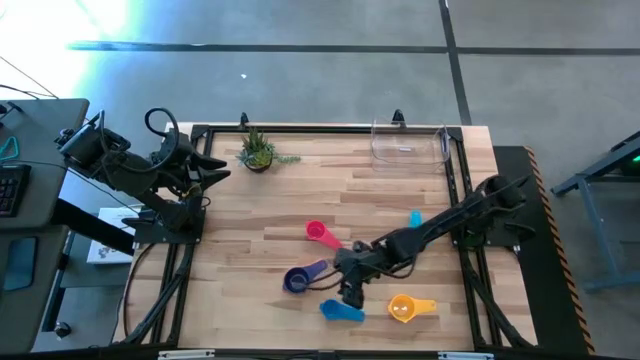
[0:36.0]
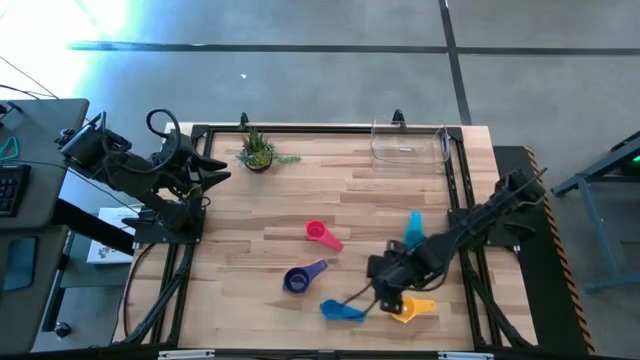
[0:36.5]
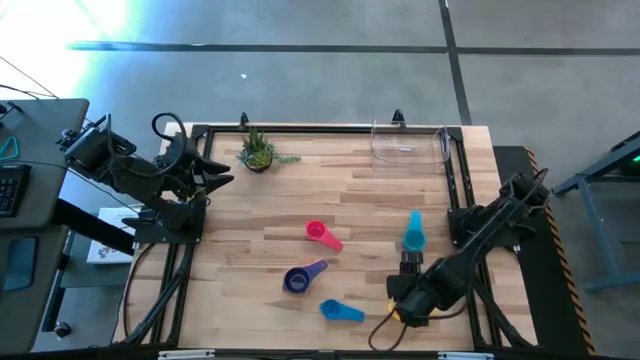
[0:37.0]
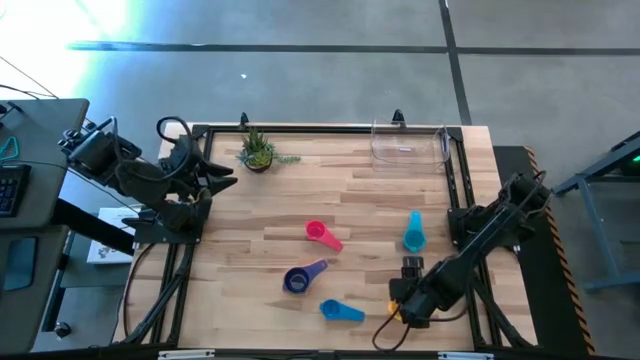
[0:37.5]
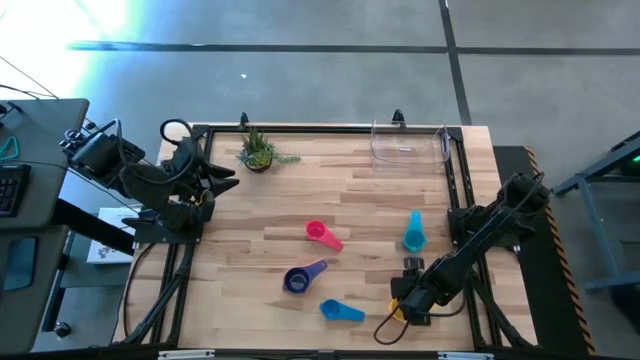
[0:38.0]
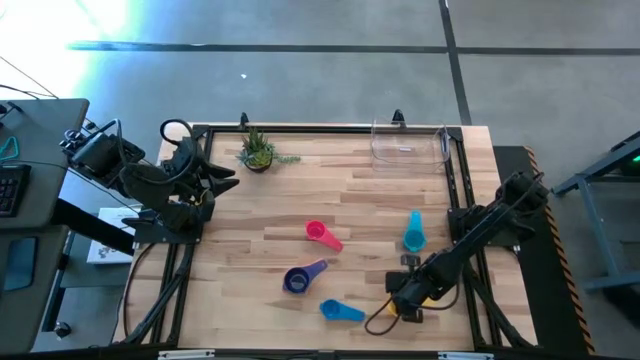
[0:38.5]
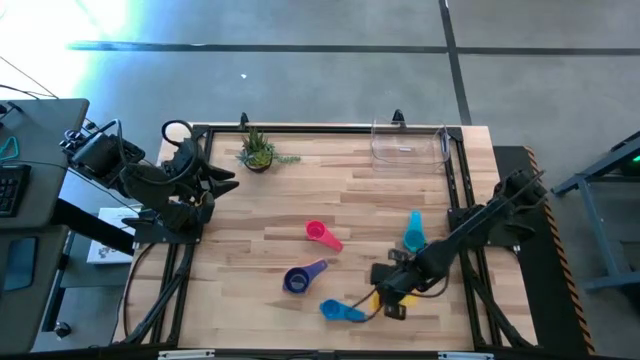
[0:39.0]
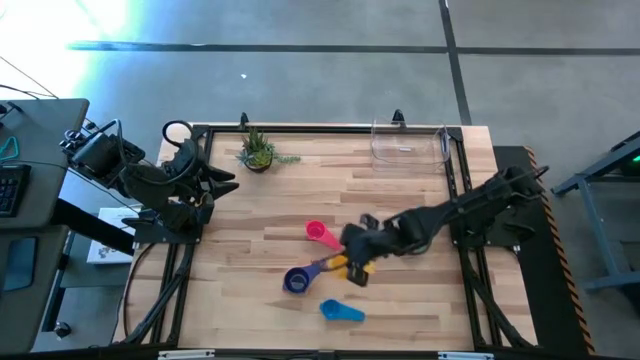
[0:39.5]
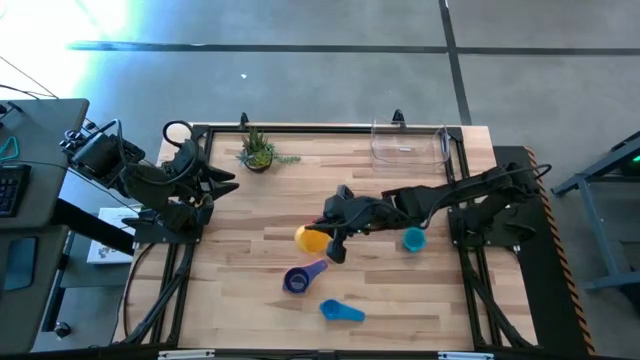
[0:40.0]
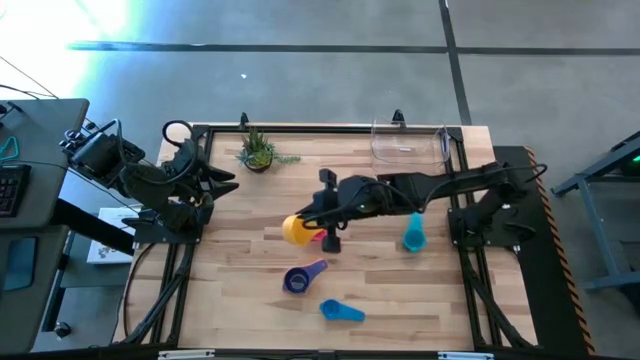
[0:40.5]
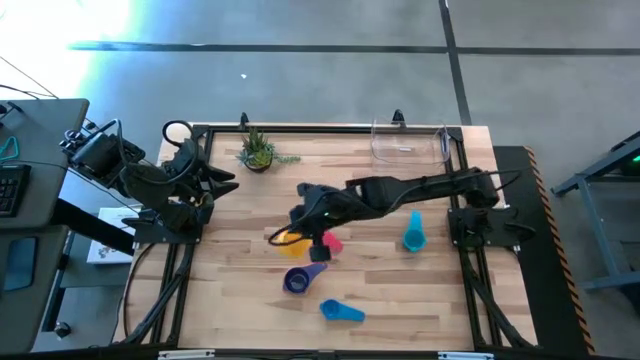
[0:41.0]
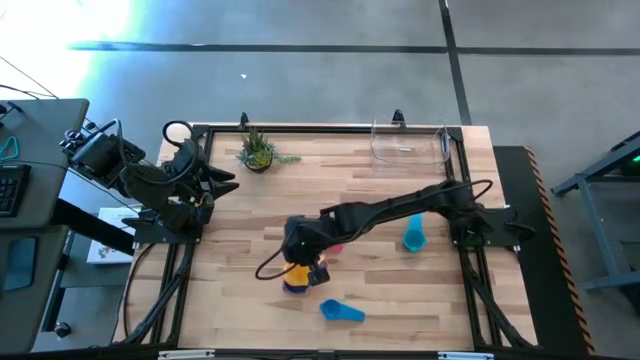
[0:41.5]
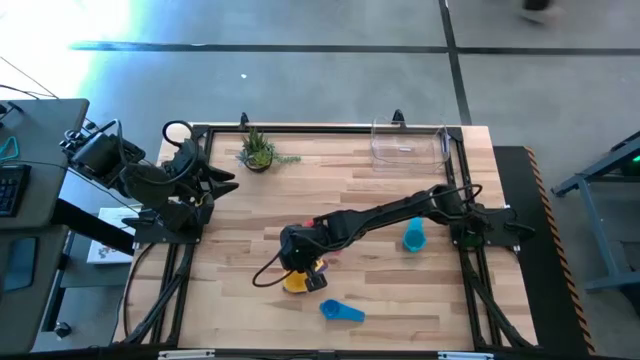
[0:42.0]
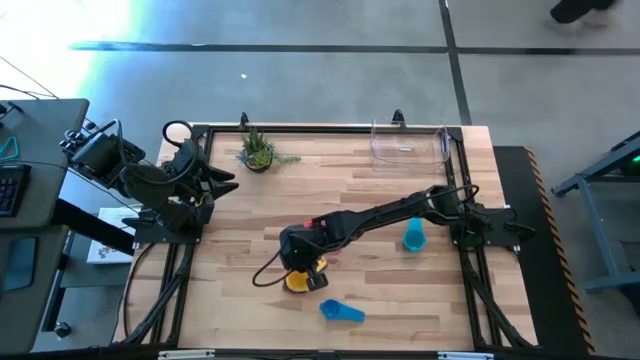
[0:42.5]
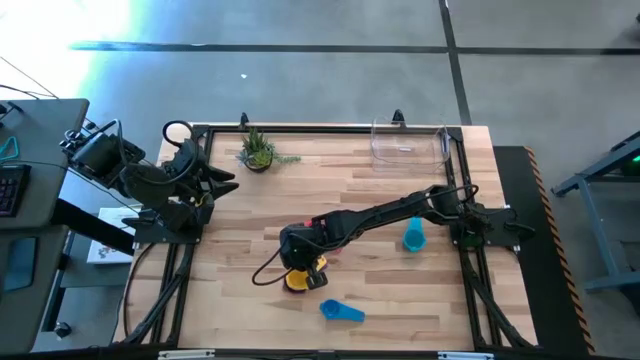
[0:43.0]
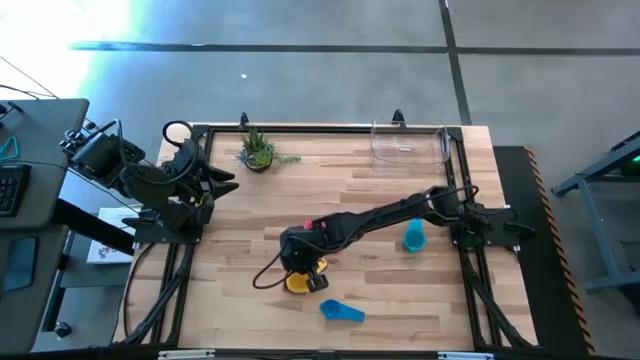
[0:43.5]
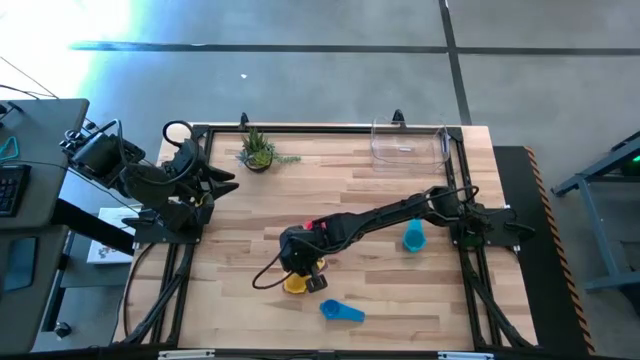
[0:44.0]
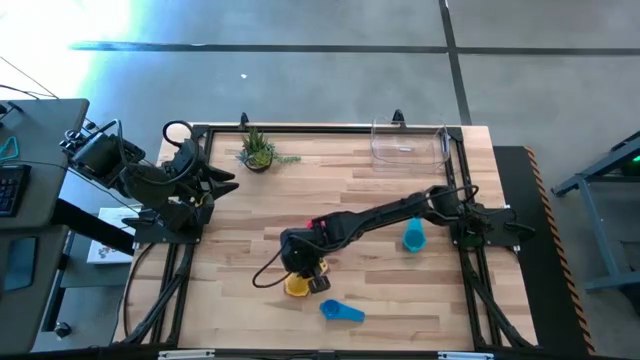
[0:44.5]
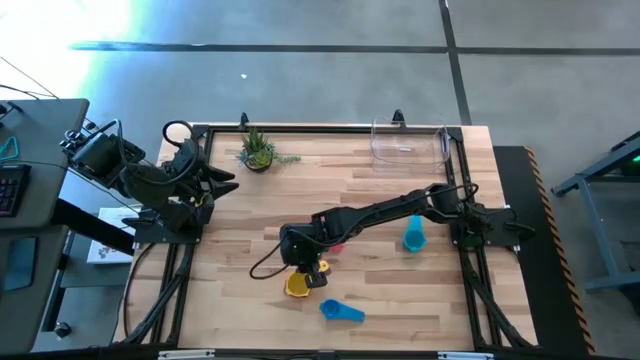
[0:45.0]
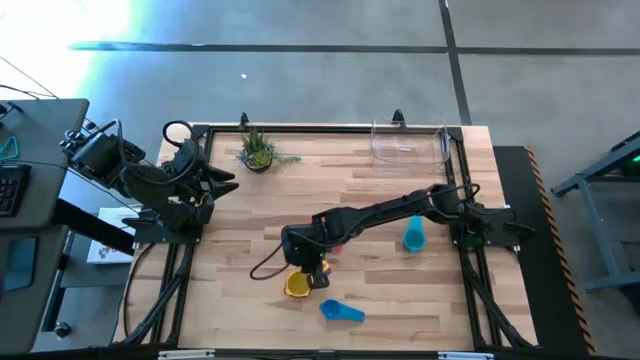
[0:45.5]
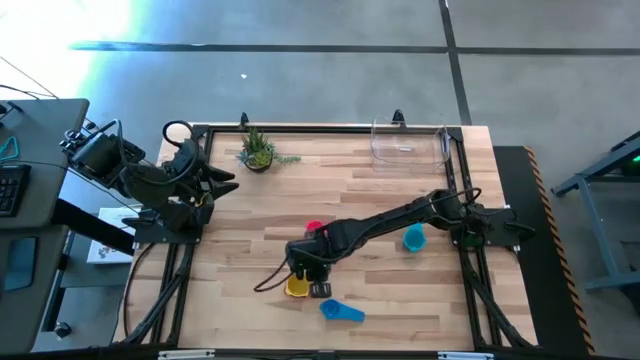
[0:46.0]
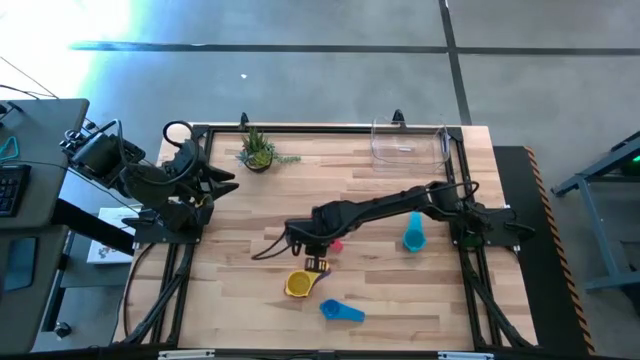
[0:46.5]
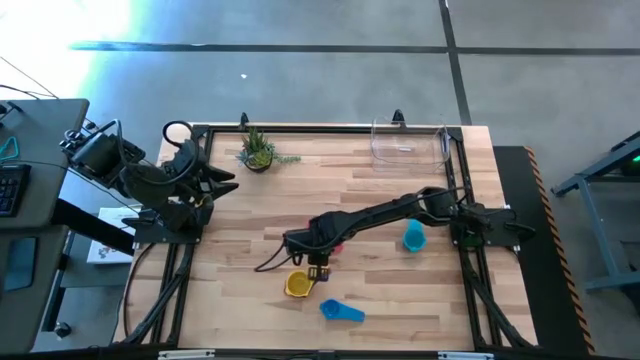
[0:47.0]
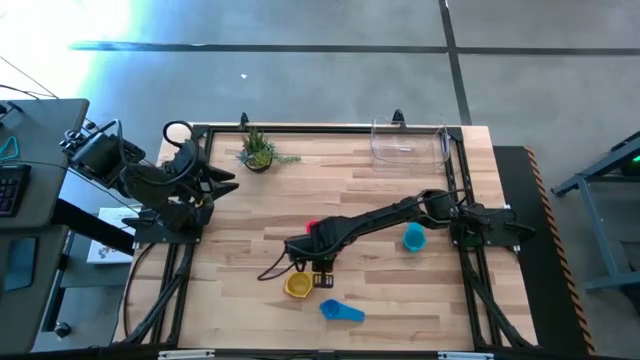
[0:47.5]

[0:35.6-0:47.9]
Task: Nest measuring cups in basket
Stack the yellow measuring cup on top of the violet measuring cup

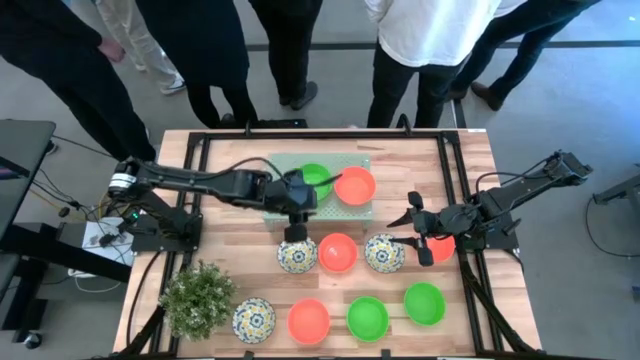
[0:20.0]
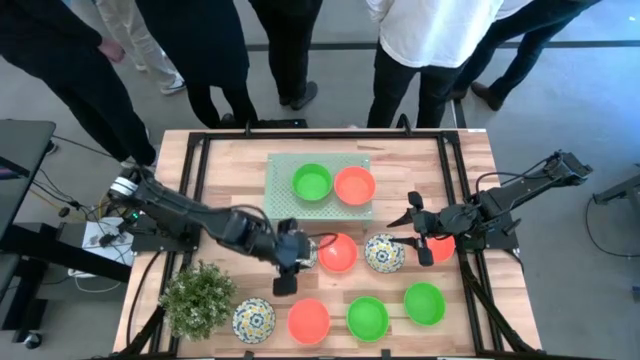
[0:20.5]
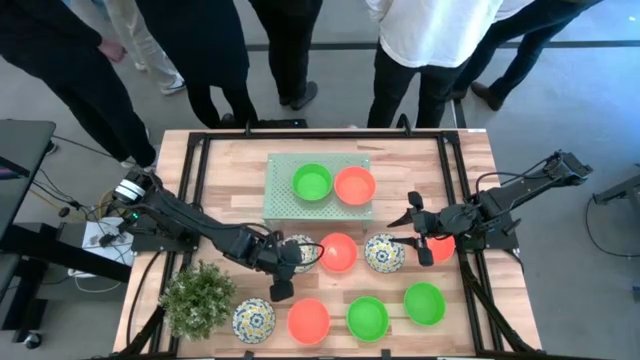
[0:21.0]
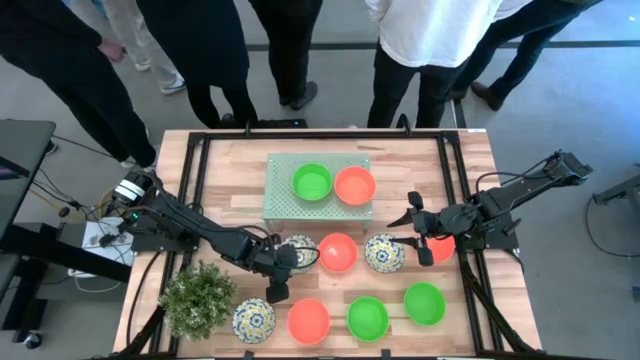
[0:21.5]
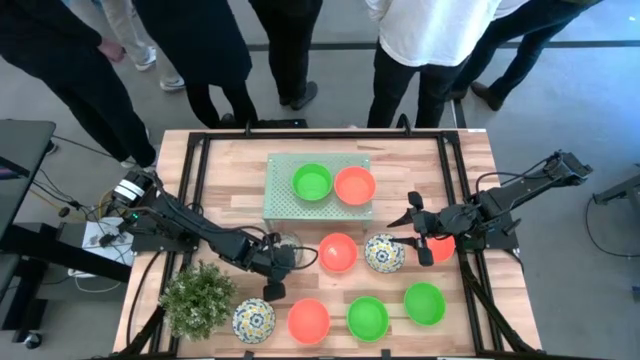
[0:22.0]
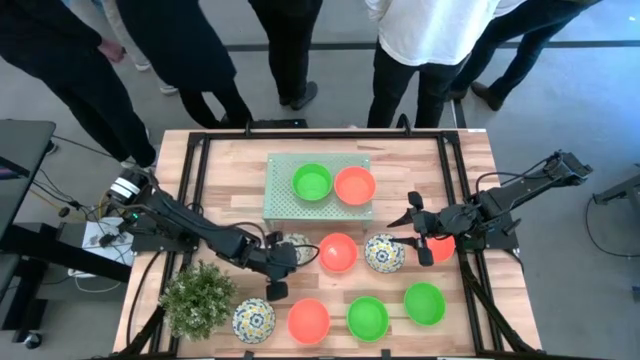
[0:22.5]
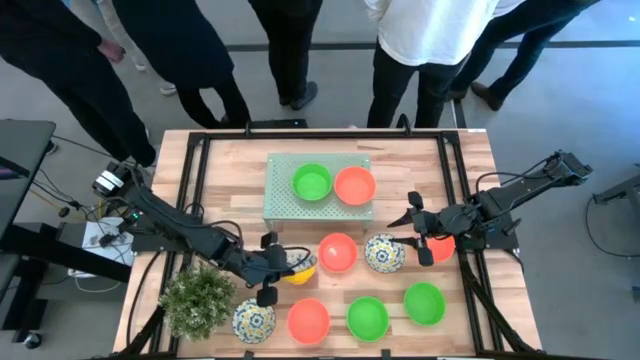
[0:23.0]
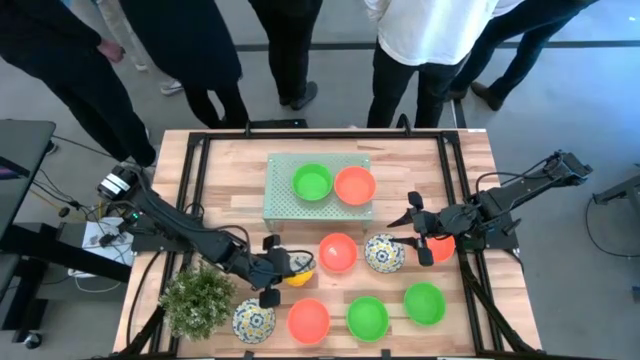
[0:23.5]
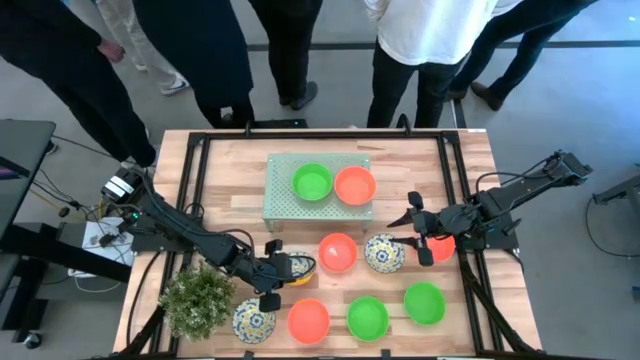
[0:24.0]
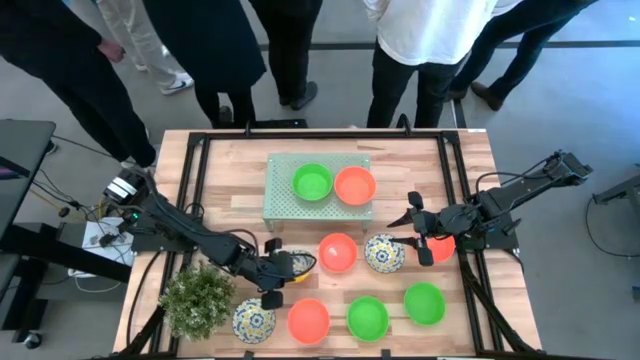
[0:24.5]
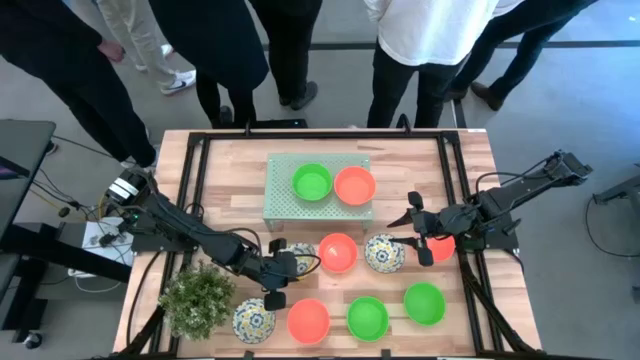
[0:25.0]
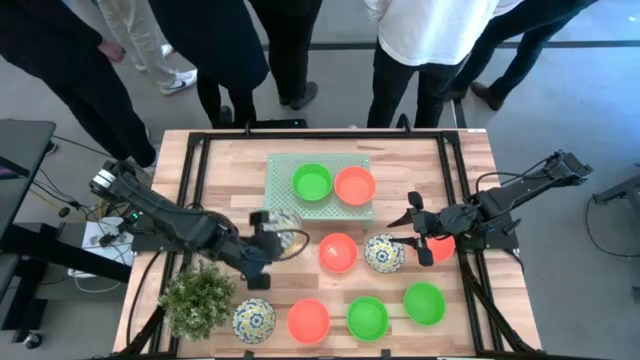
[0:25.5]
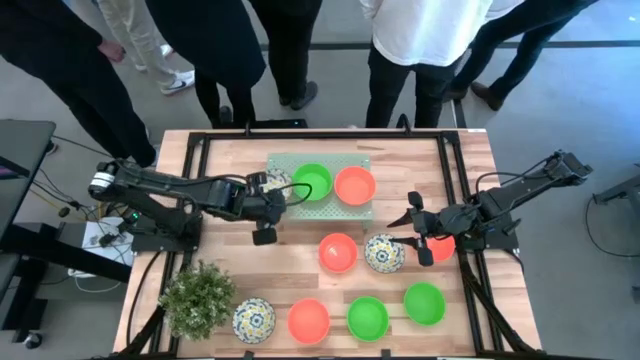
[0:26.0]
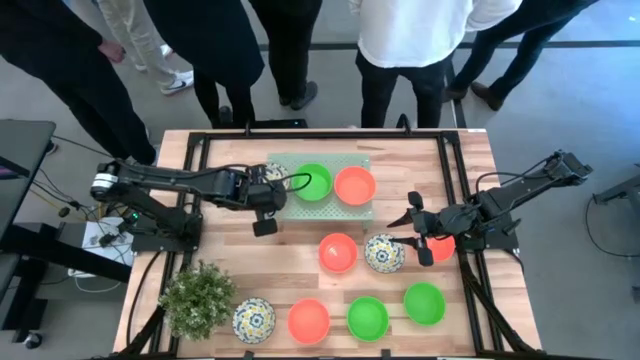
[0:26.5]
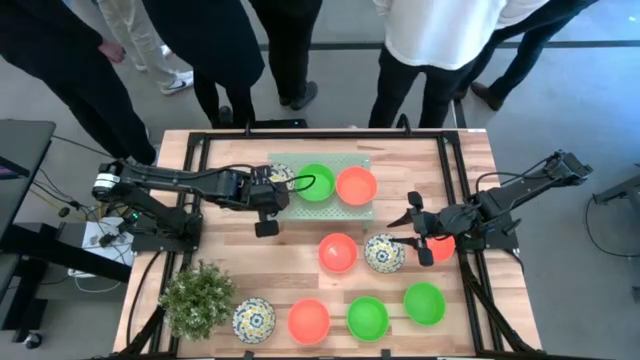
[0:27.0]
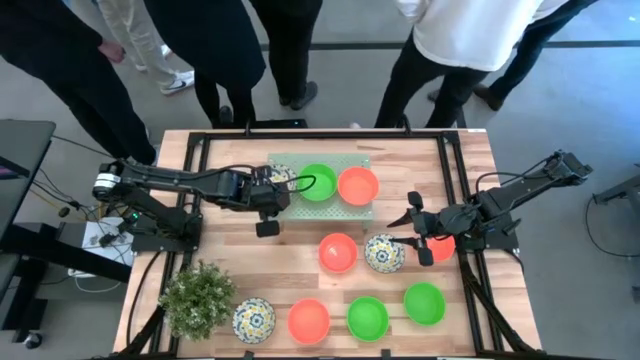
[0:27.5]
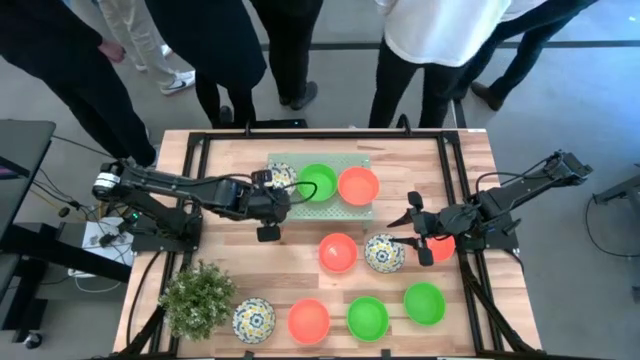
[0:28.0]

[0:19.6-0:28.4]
Task: Pick & Place Mini bowls
Put the white patterned bowl on the shelf
